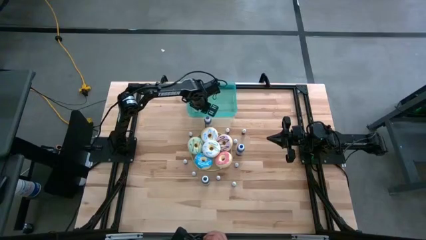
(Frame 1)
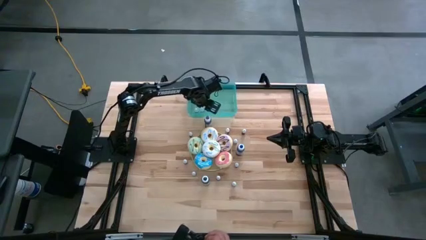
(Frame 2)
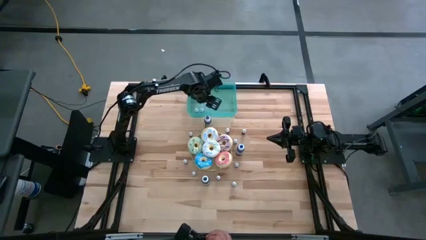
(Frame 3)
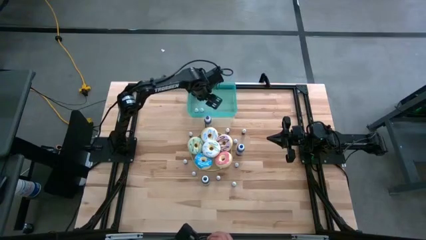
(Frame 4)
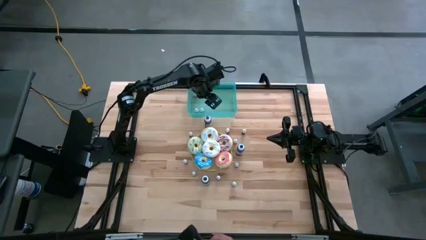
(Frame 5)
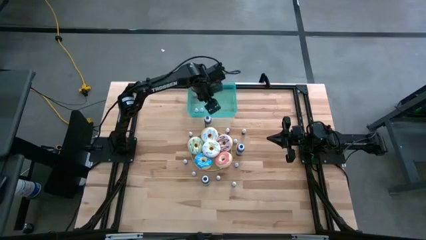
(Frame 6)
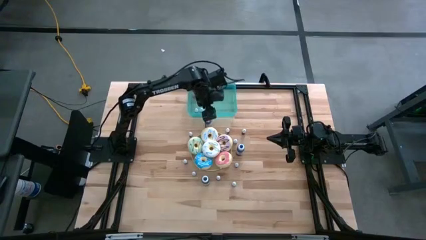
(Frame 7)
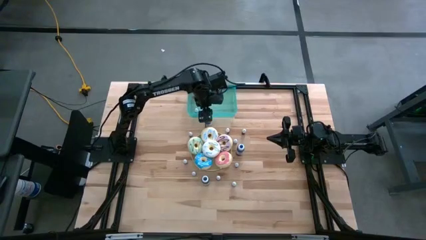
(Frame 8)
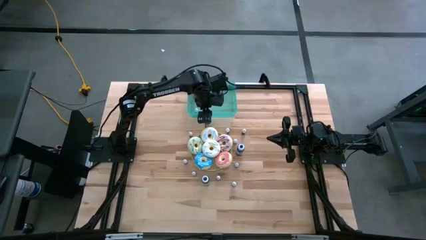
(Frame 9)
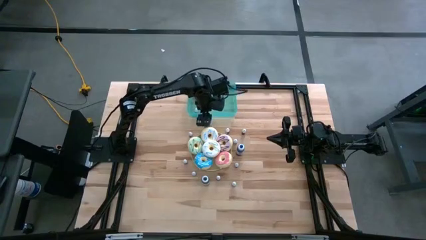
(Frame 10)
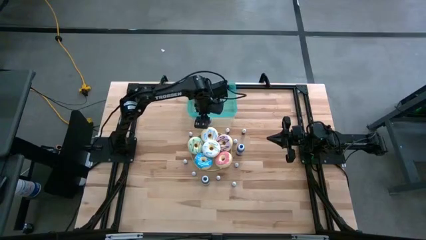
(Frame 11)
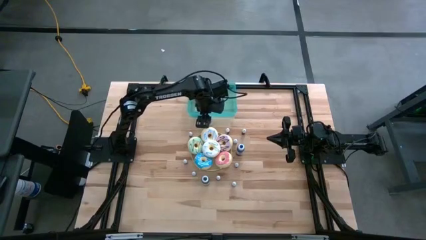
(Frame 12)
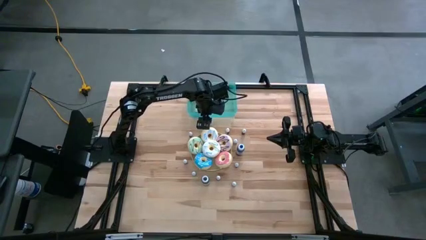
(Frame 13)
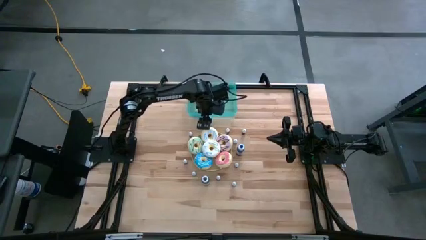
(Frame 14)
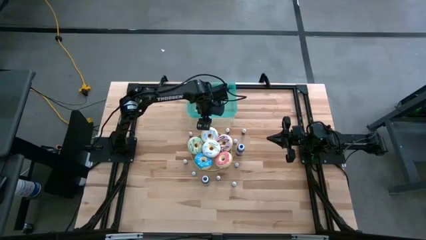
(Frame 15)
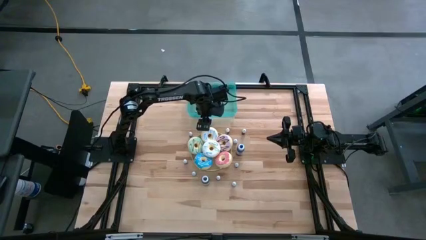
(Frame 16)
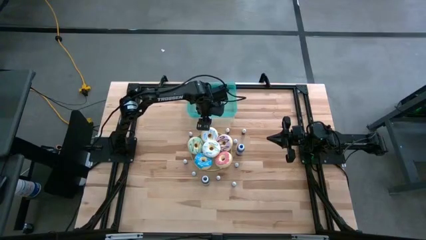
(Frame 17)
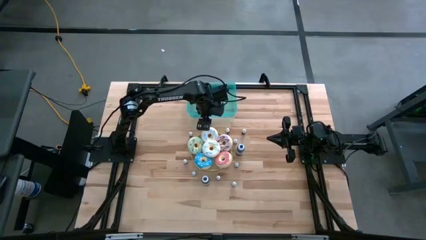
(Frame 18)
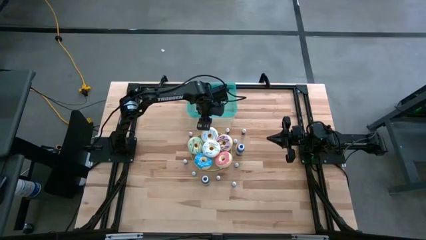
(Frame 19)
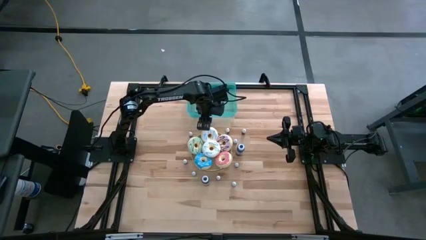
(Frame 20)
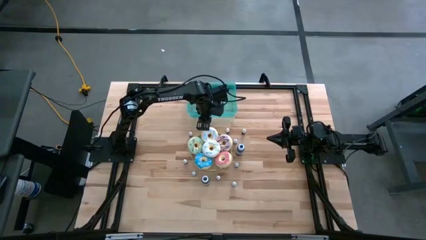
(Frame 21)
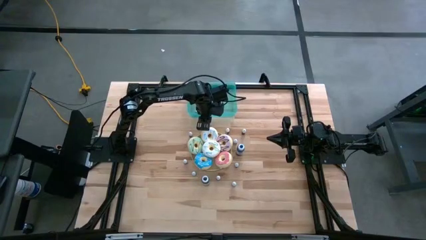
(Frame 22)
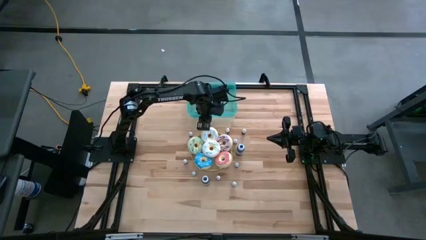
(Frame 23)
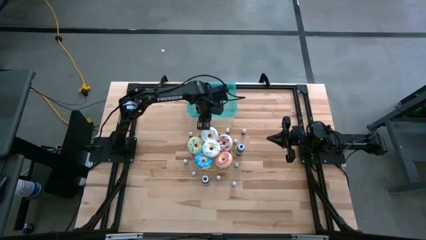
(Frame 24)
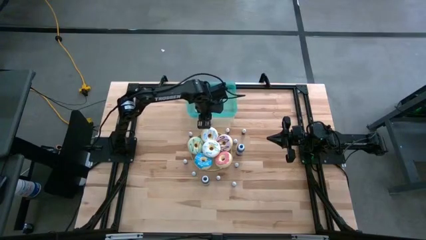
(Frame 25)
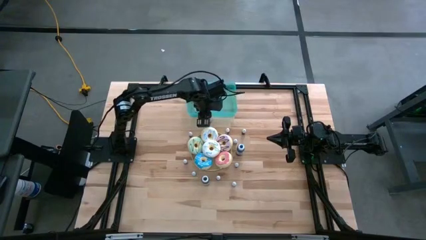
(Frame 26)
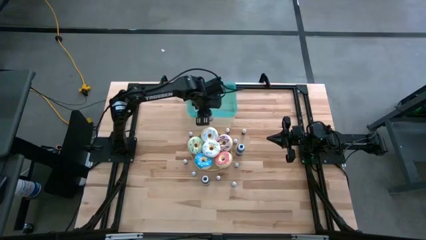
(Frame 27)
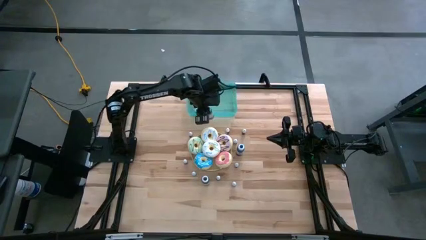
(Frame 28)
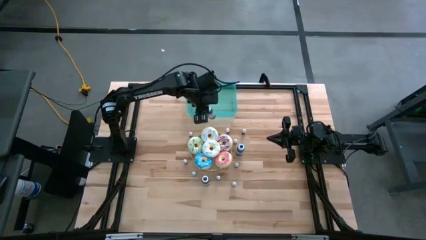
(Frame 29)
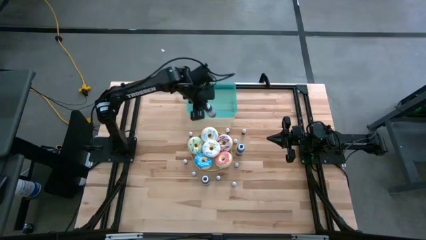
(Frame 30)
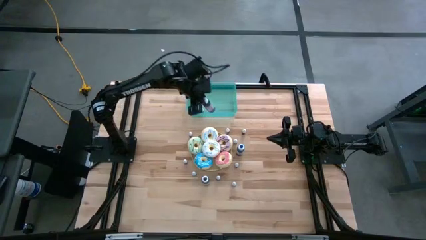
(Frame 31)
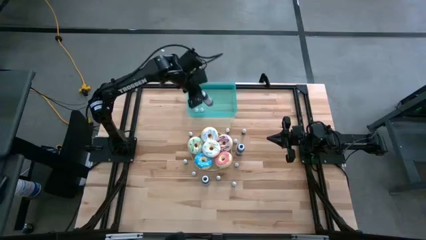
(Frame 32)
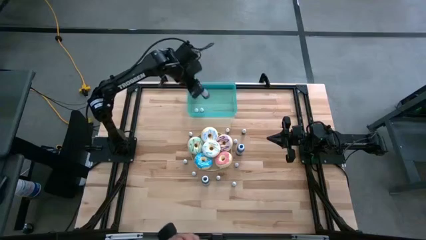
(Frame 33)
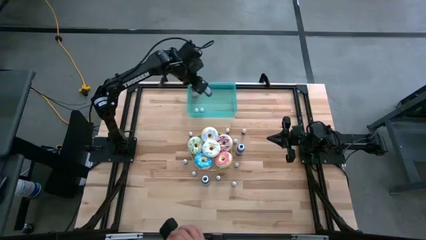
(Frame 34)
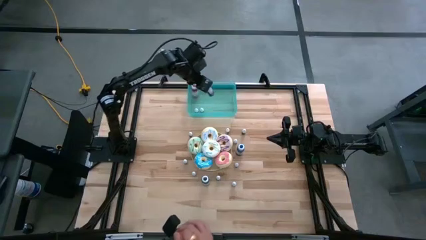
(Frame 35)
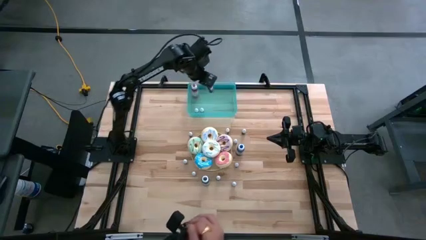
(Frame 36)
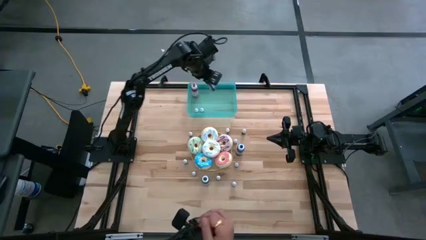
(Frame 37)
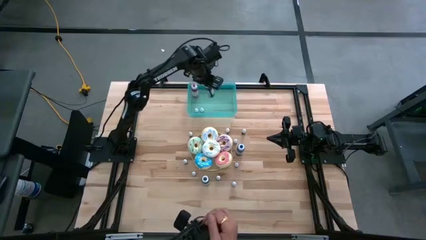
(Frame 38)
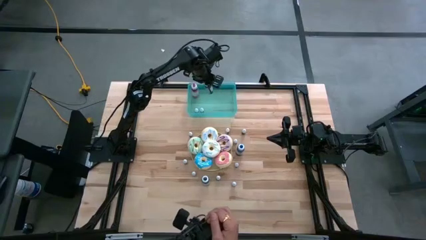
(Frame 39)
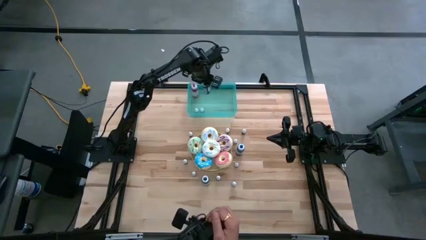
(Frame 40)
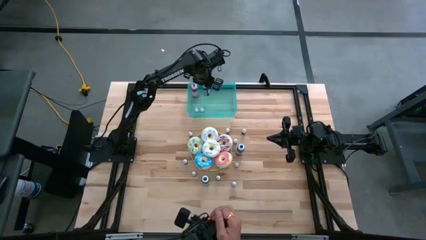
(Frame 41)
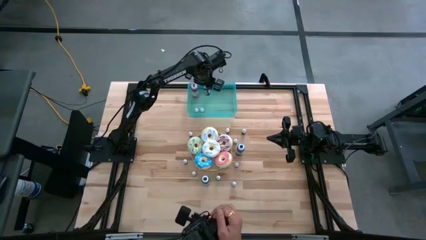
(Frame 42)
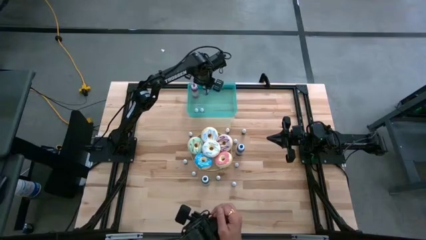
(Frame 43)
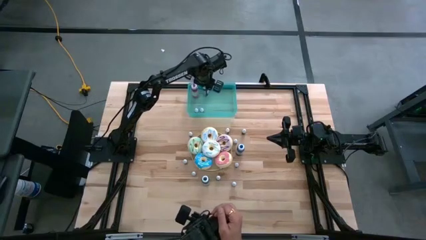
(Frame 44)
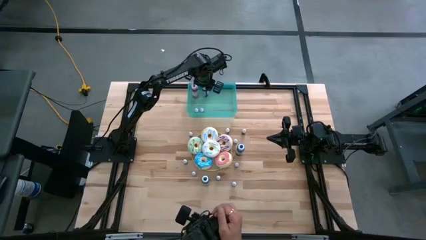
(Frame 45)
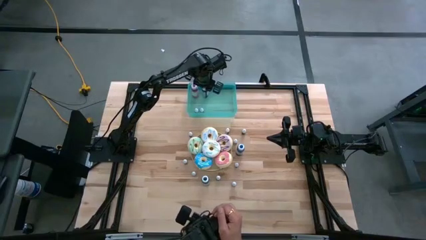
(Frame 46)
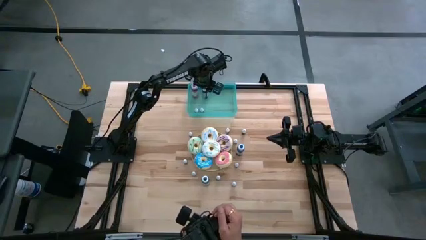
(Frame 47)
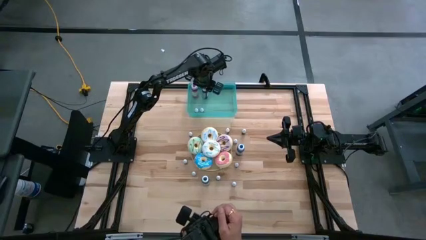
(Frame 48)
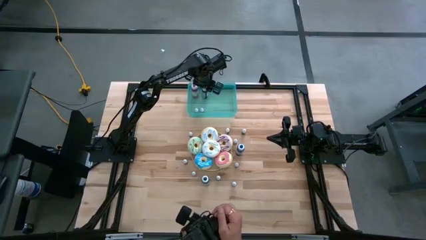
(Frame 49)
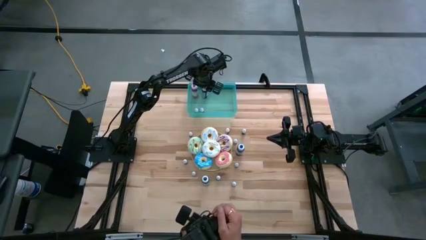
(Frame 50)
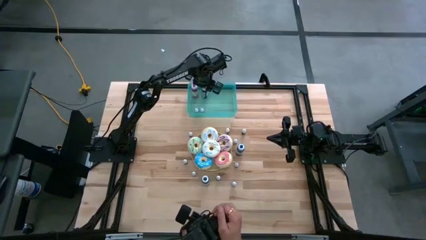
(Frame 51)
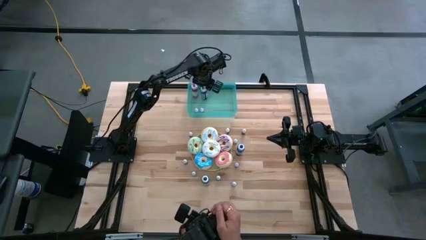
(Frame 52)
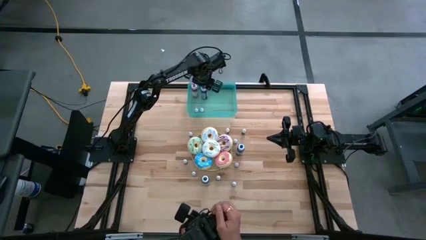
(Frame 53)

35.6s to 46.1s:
Task: Pick & Place food coloring
Put the large violet food coloring bottle into the green container

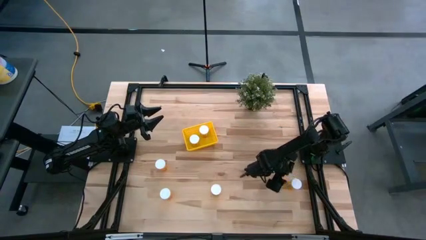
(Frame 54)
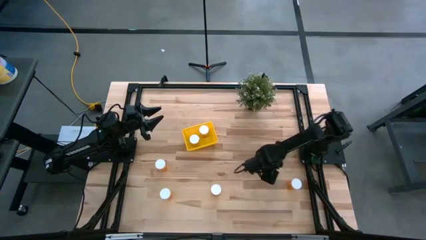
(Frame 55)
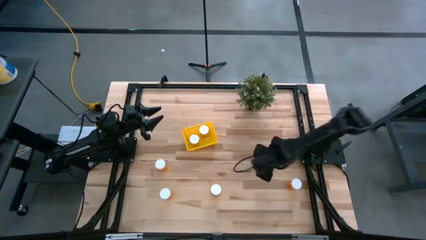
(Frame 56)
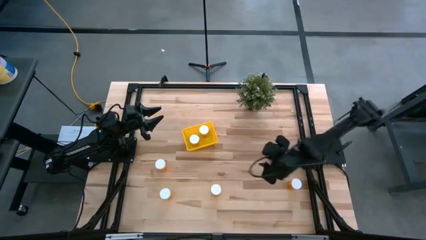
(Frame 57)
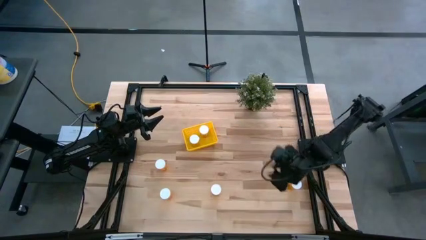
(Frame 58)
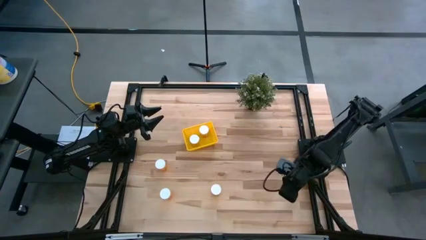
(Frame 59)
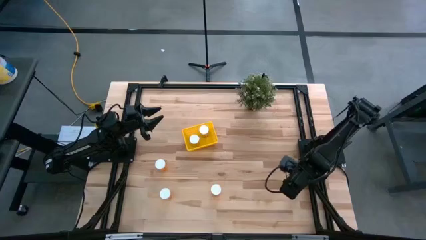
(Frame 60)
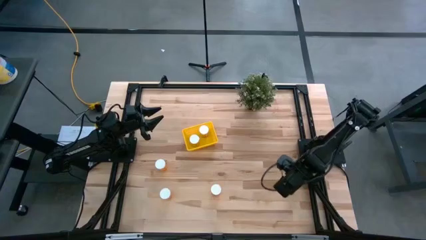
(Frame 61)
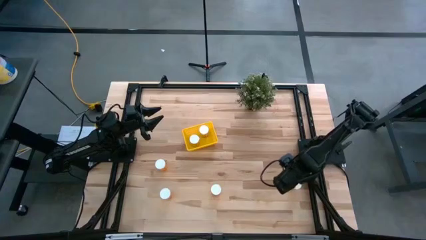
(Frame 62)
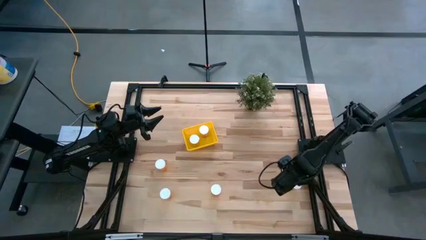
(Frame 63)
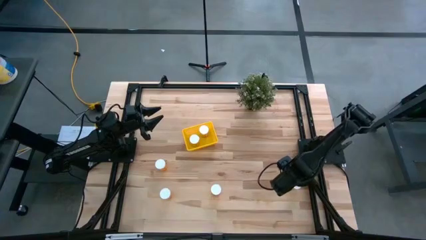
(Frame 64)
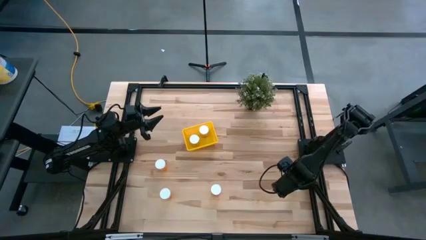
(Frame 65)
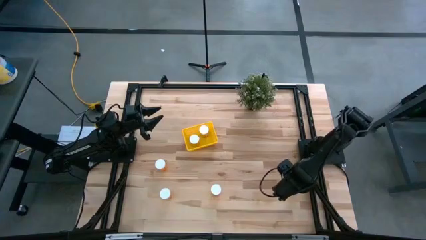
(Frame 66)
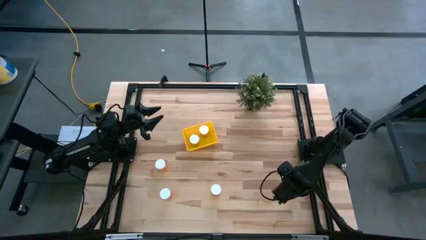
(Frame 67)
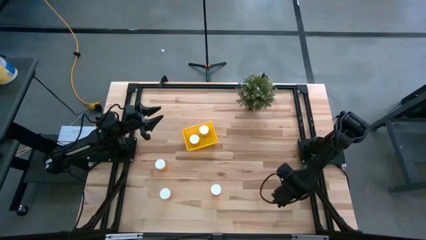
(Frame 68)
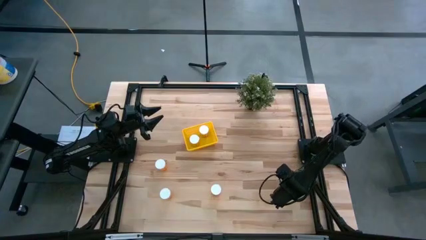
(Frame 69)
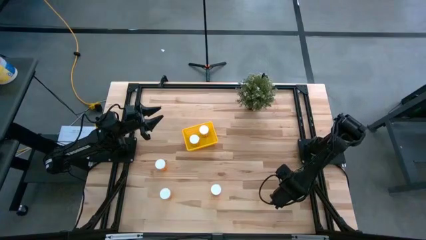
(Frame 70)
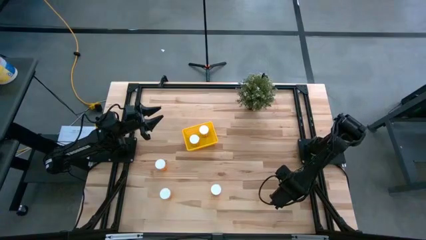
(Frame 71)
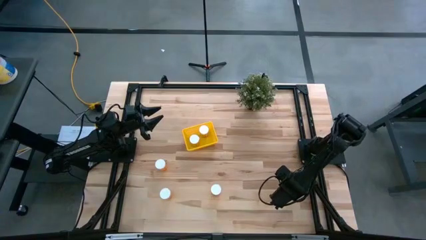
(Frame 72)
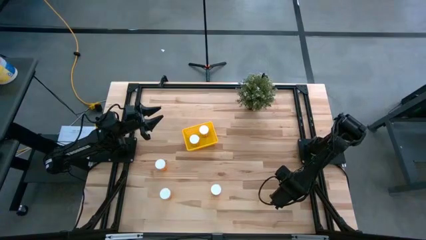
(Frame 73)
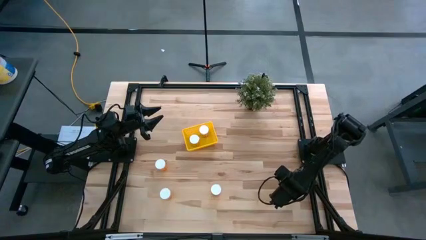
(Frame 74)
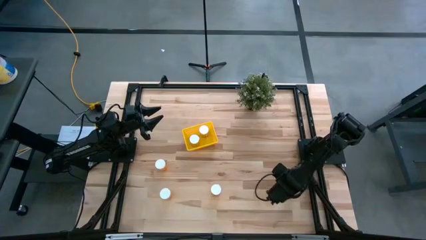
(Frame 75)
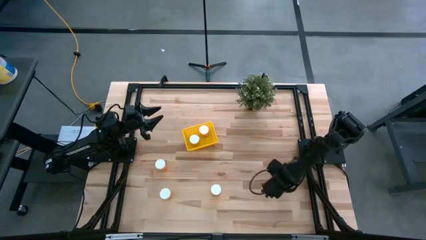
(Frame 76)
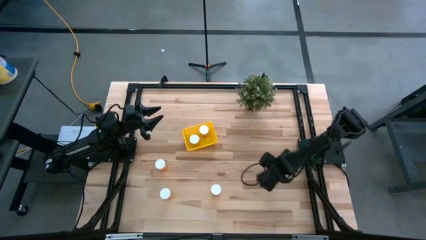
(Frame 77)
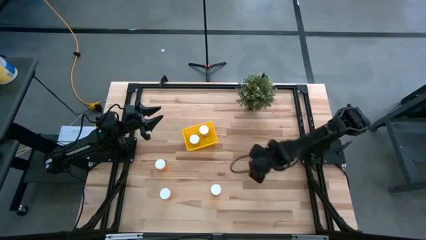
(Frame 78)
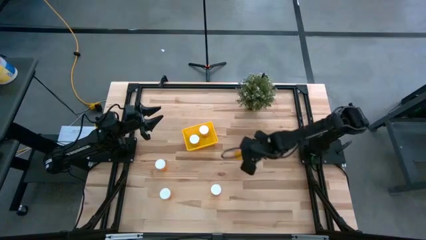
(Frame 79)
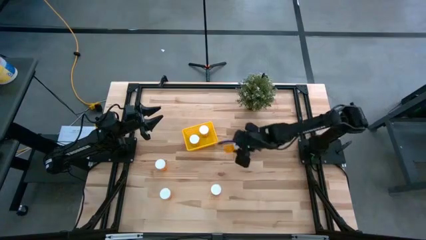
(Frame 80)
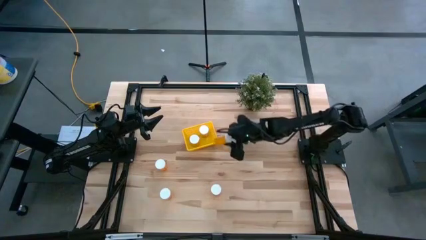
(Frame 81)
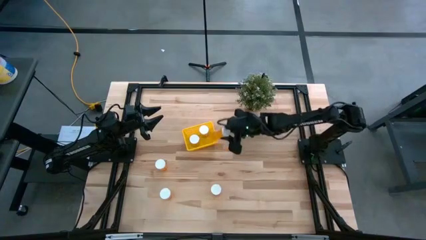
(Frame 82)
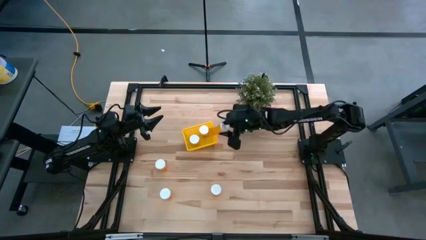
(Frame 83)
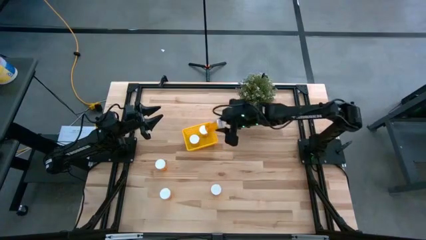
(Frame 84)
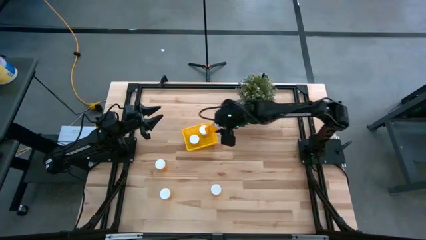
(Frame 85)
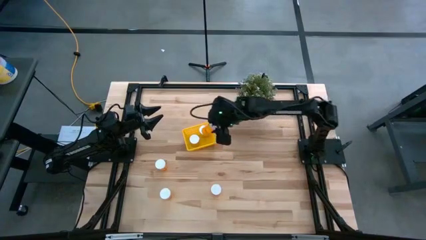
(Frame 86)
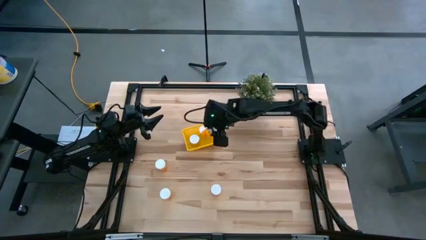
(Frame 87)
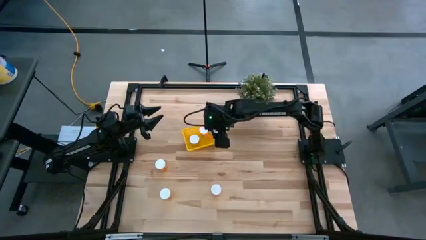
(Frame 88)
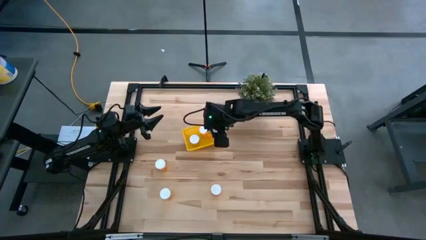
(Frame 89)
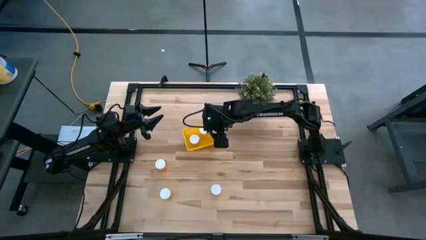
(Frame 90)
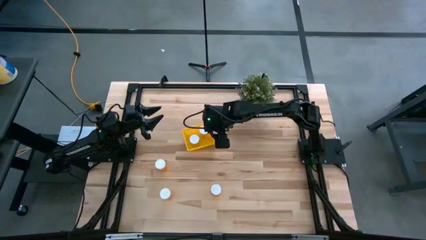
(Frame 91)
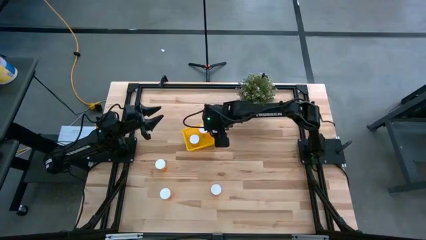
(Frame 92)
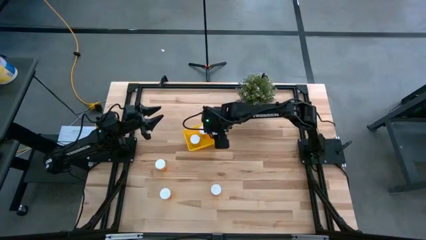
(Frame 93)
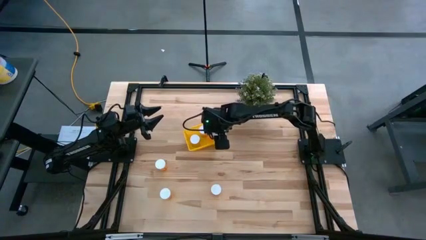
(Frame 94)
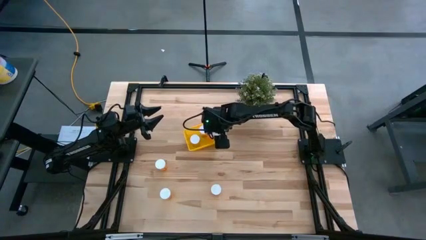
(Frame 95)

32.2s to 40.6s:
Task: Pick and place pill bottles into a basket
Put the orange pill bottle into the yellow bin
